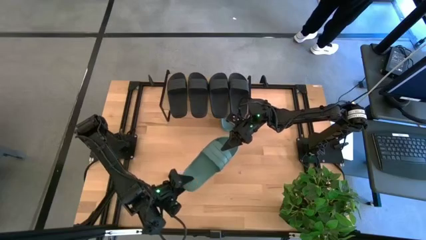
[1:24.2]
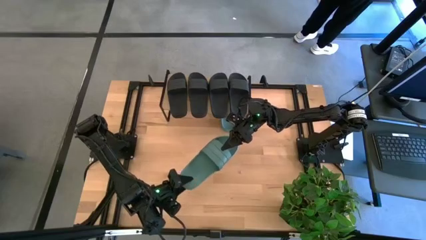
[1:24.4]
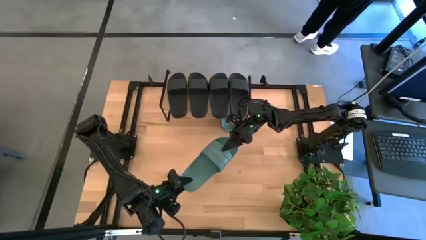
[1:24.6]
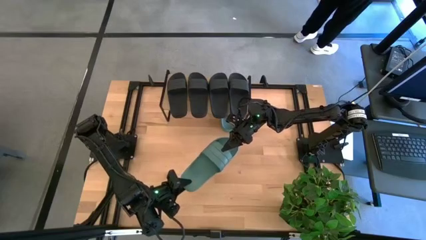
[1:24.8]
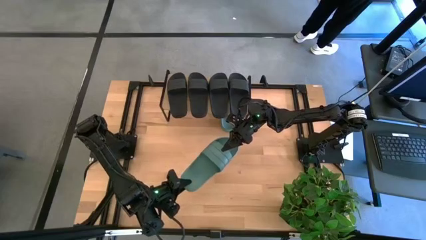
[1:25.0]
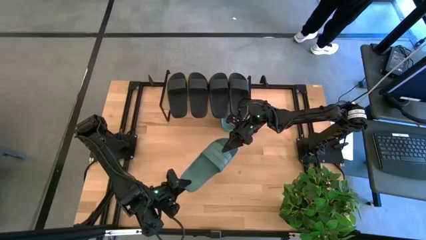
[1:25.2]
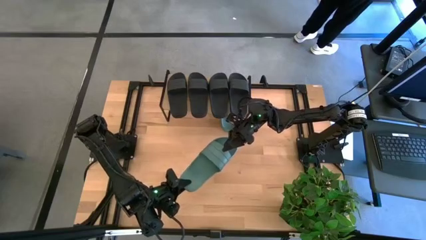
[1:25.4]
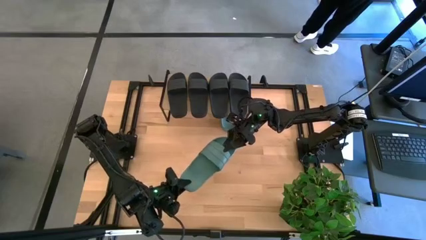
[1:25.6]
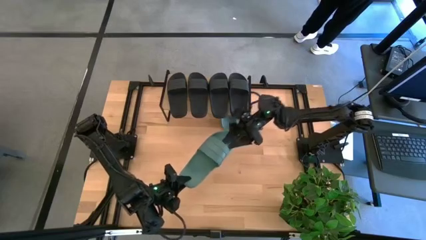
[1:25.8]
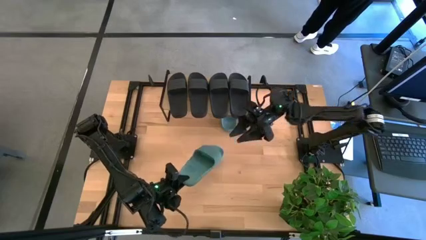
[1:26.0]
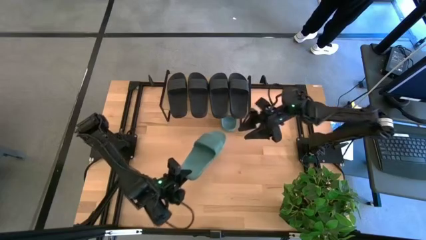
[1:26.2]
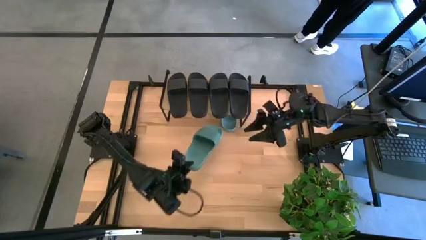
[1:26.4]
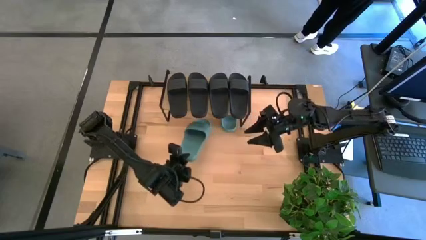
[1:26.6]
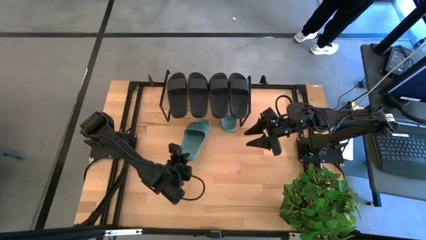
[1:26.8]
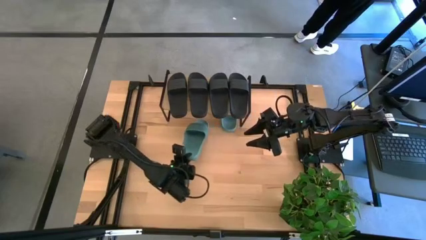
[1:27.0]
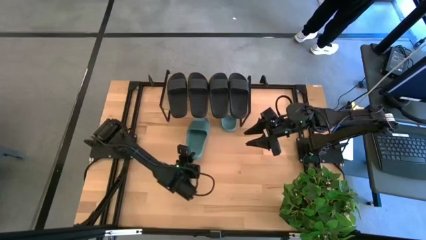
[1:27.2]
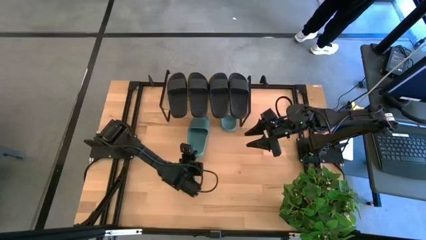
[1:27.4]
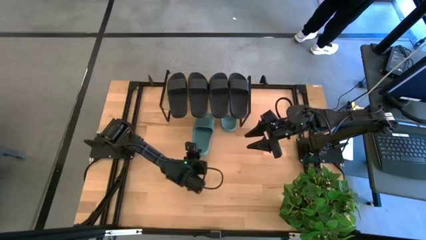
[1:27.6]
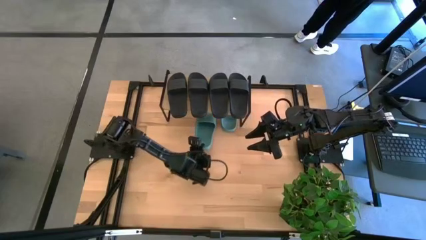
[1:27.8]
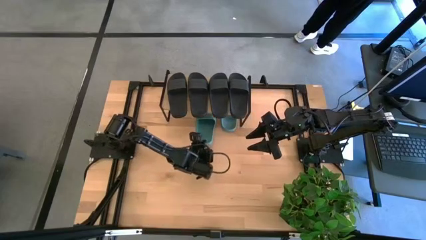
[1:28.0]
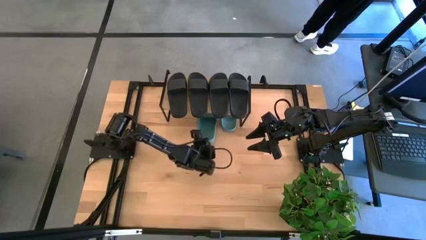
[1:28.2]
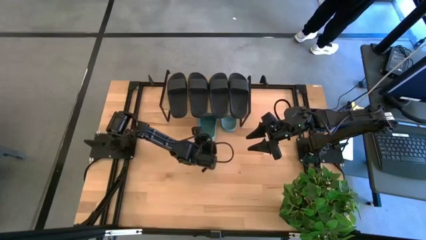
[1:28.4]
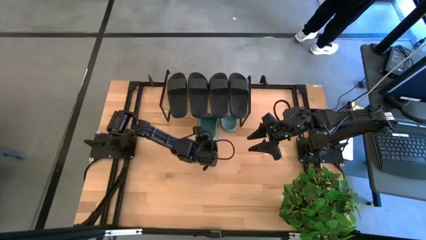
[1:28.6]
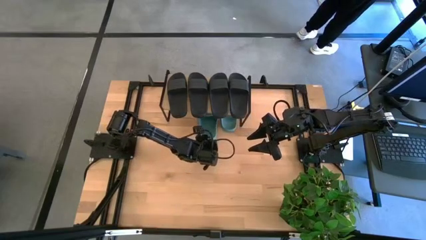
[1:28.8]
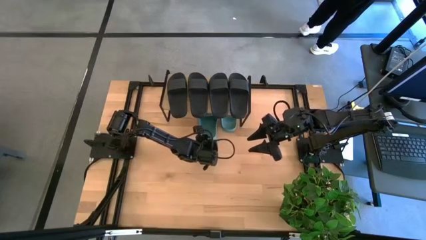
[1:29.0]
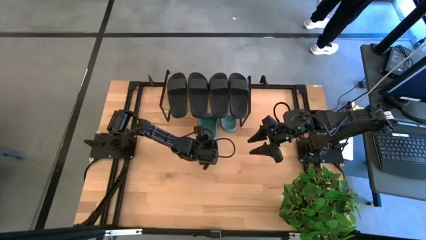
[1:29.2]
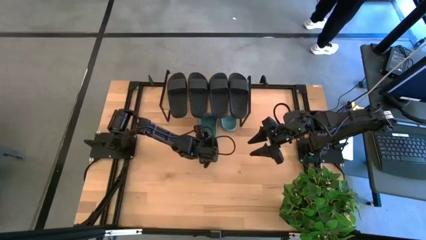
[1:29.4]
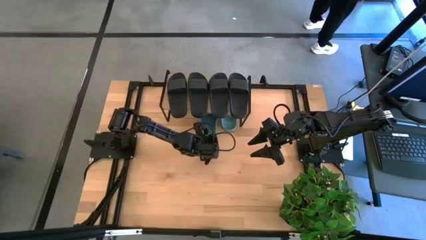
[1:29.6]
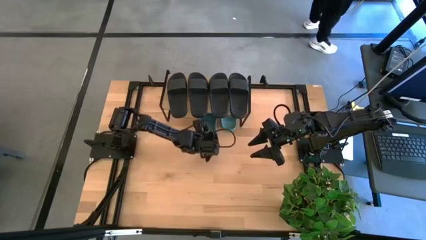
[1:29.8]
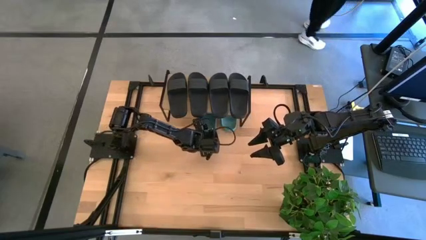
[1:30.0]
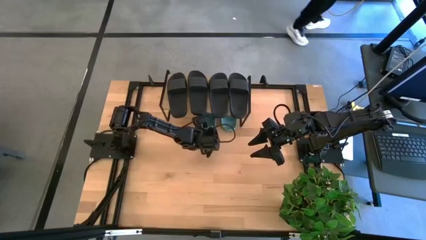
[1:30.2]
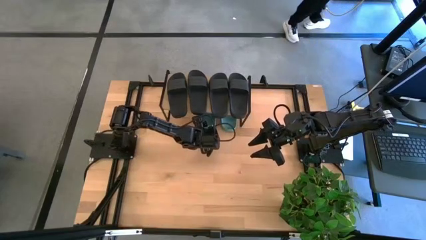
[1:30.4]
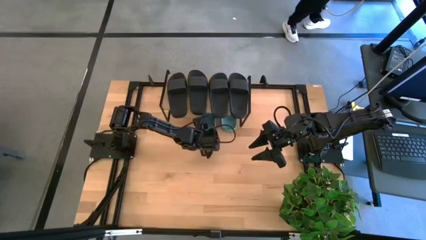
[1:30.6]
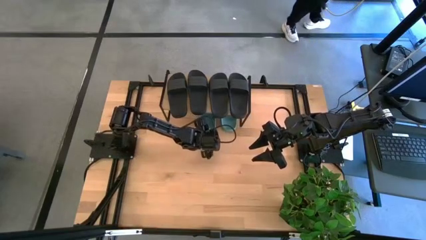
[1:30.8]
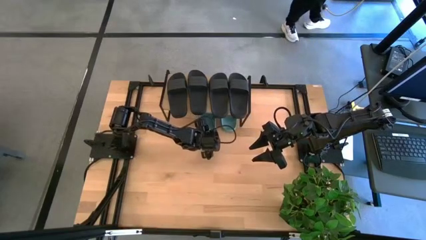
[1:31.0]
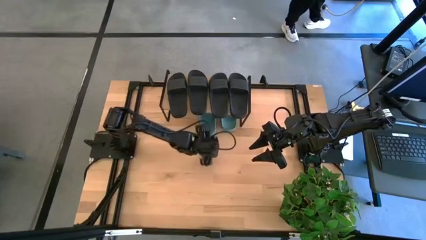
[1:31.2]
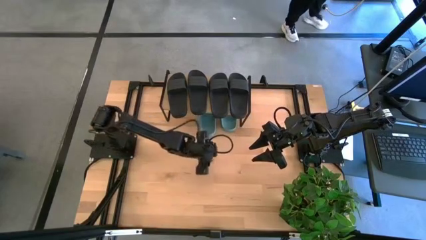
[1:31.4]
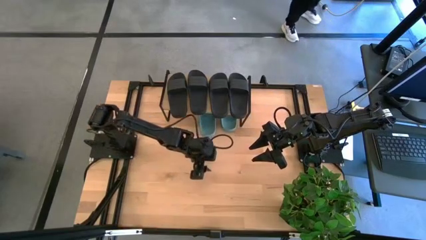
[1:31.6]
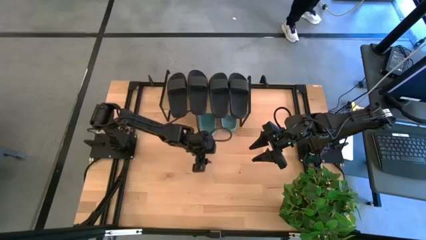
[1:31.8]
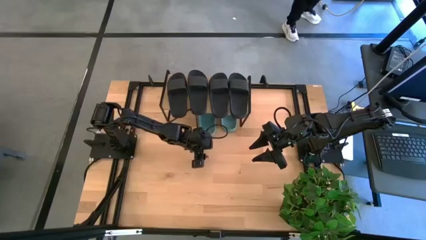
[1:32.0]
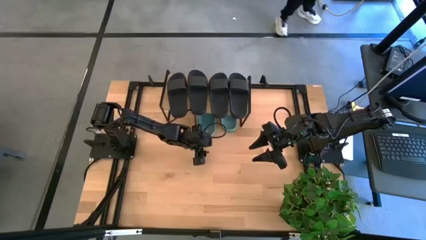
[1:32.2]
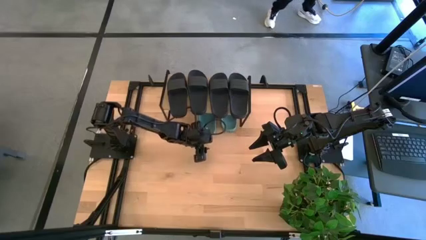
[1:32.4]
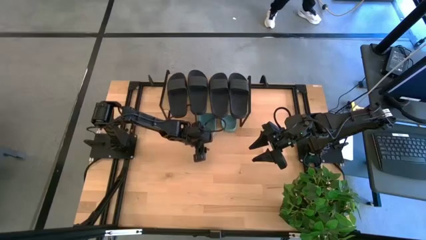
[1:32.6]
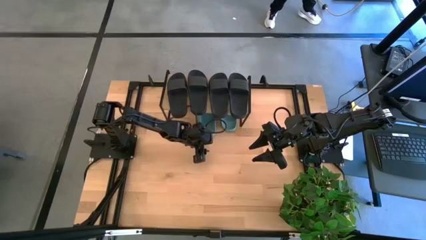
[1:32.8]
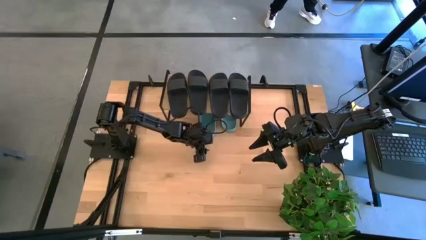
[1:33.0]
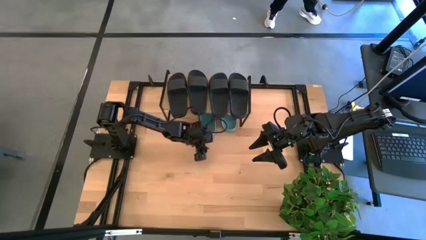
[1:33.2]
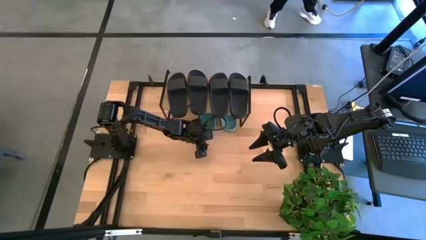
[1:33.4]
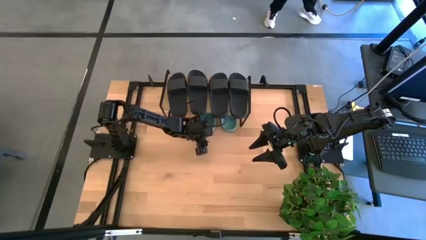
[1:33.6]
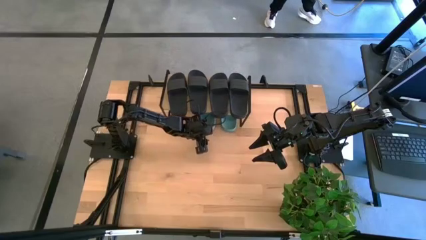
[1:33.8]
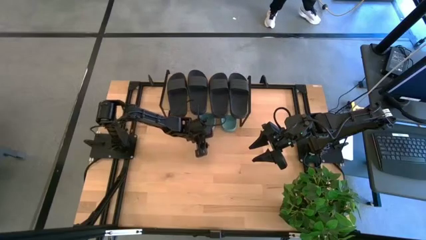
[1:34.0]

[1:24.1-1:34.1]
Task: Pick and place slides into the shelf
Put the green slide under the shelf

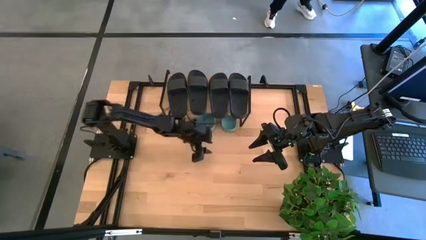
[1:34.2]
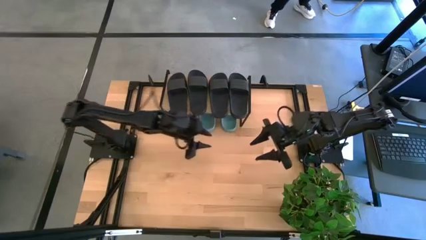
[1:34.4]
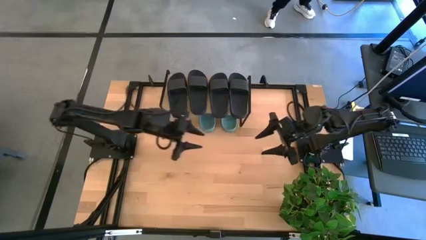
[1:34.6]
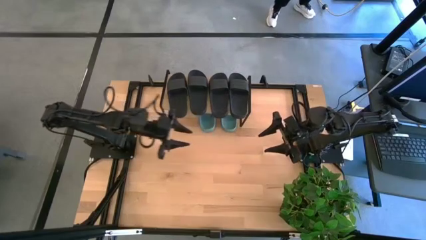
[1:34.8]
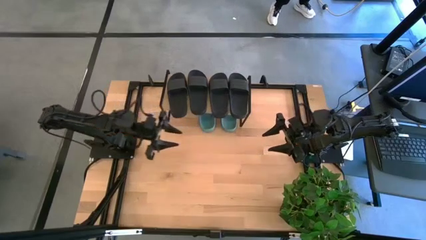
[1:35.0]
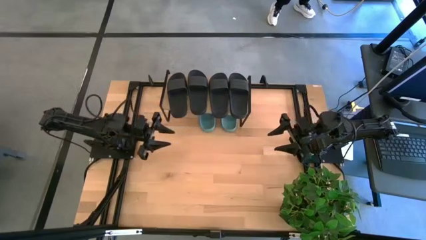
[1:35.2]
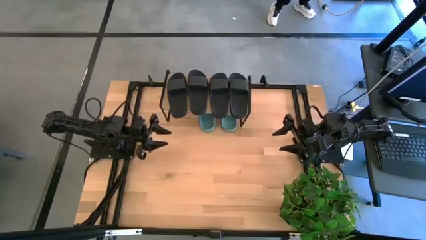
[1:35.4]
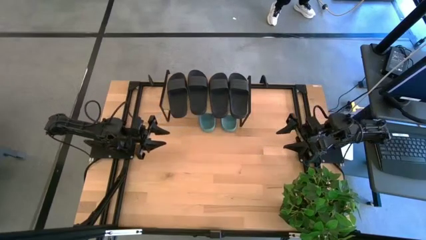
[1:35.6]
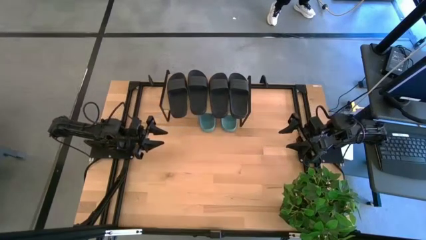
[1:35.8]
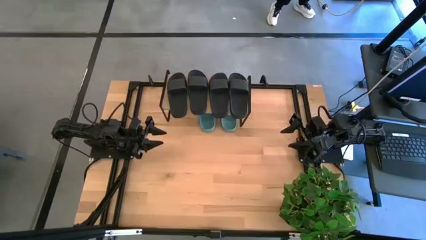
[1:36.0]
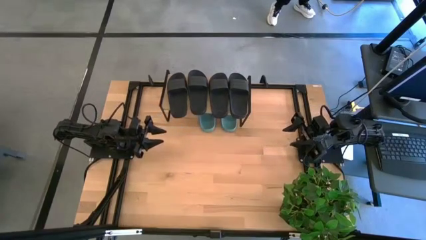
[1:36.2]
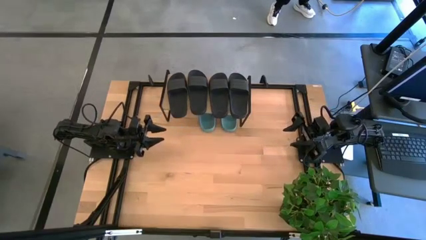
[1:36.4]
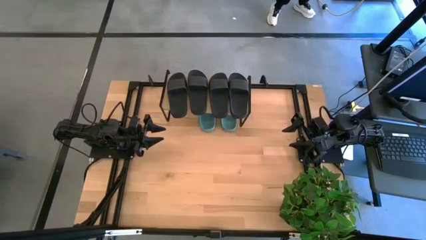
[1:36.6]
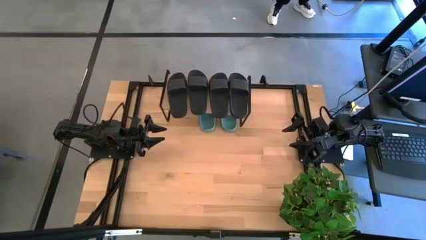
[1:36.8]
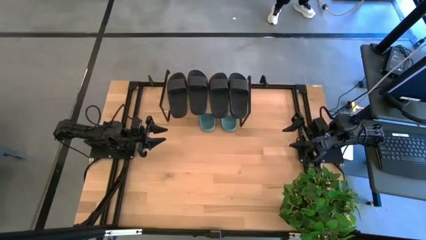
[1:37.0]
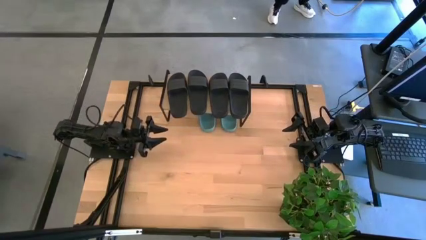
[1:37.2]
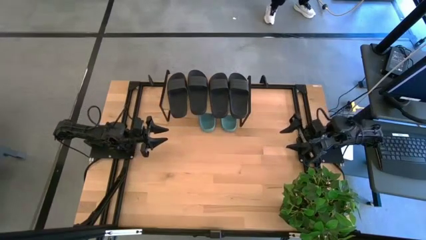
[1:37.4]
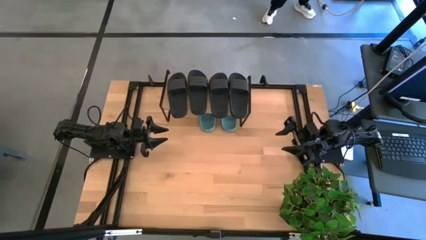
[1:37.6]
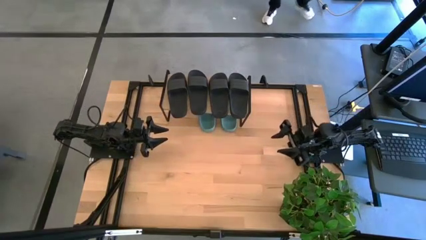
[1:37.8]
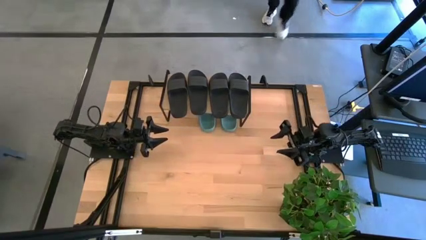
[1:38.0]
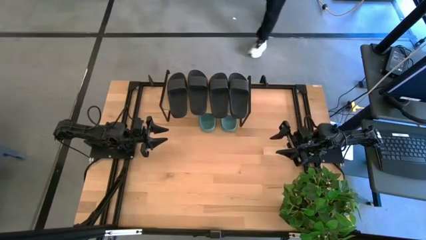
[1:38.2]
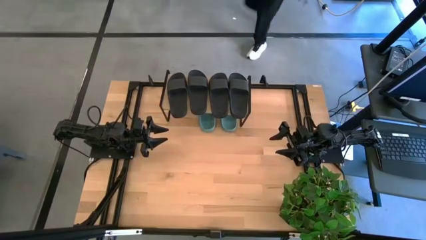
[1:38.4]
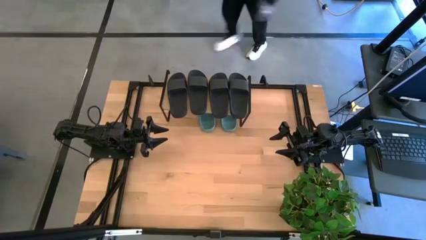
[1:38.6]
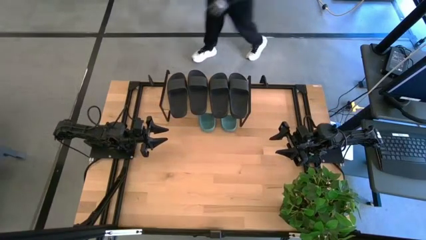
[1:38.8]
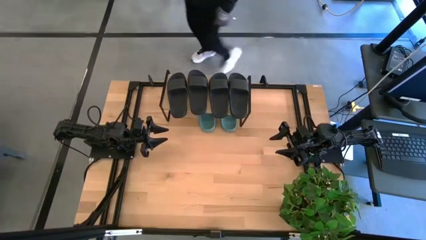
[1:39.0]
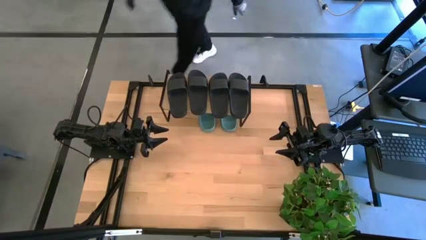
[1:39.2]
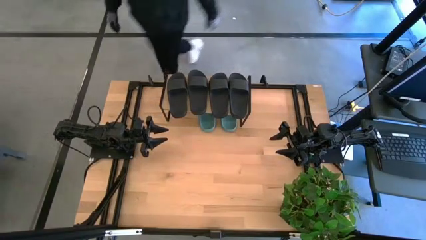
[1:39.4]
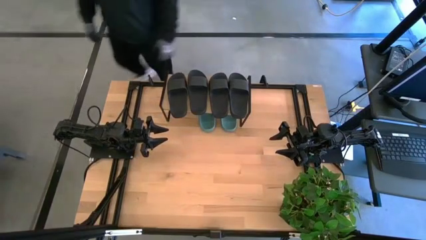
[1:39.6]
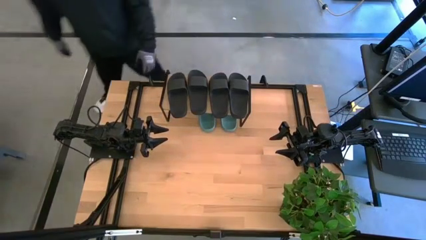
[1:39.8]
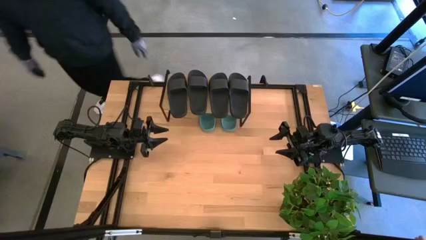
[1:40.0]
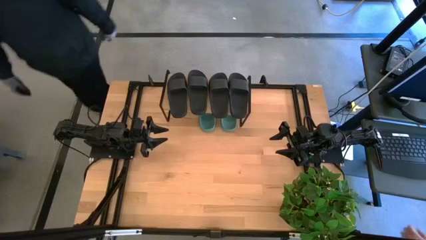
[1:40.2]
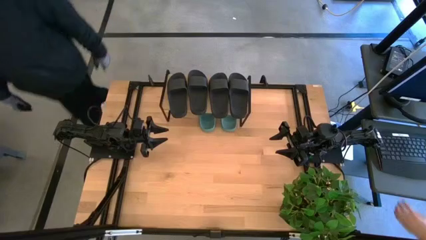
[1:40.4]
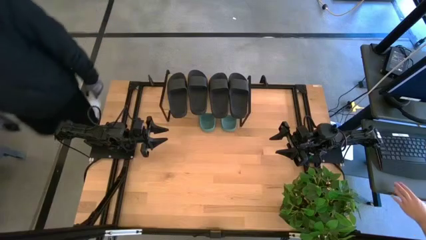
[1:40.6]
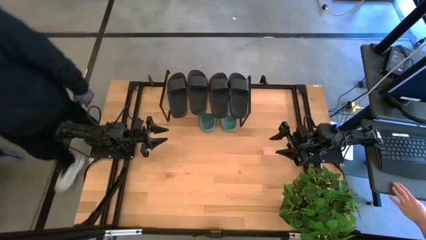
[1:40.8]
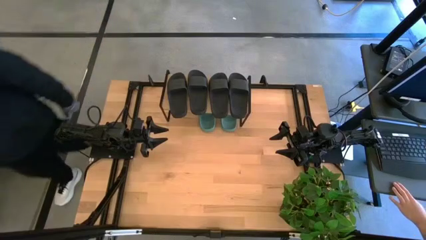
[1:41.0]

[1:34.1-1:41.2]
Return to Home Position
